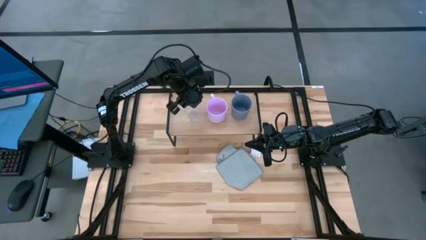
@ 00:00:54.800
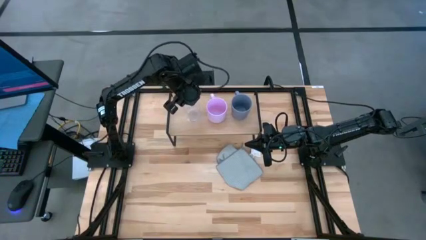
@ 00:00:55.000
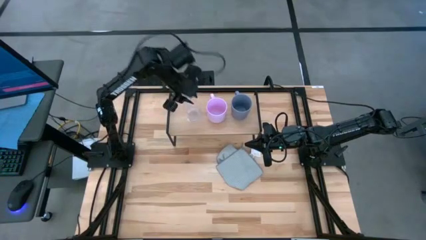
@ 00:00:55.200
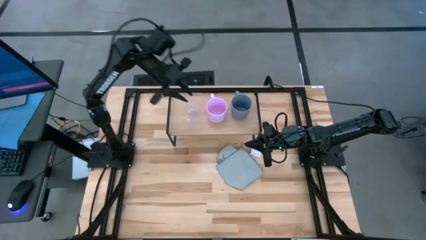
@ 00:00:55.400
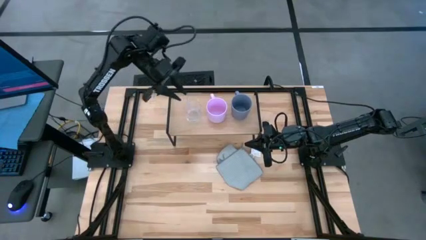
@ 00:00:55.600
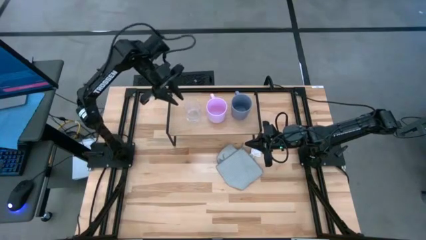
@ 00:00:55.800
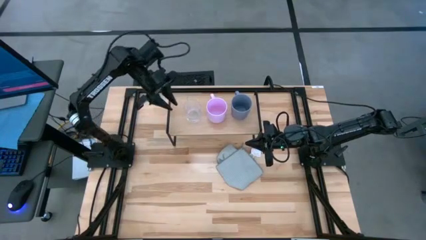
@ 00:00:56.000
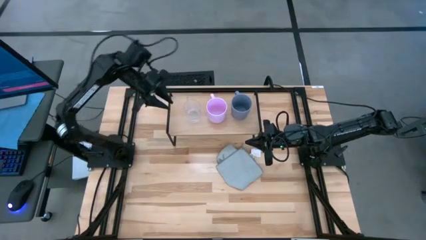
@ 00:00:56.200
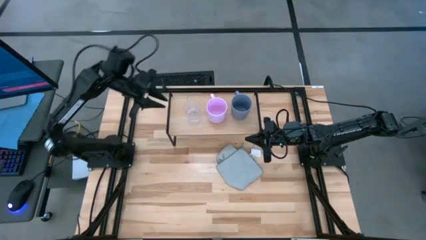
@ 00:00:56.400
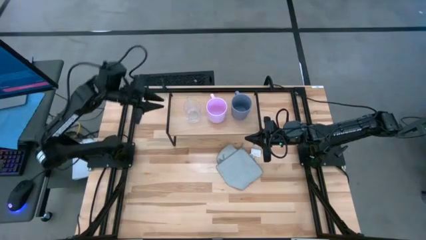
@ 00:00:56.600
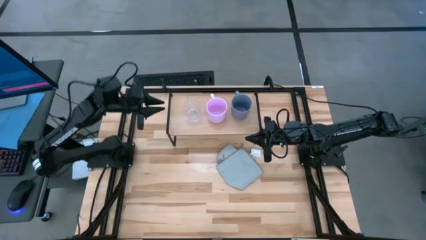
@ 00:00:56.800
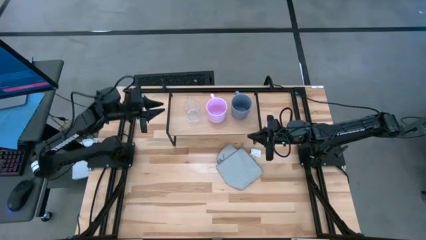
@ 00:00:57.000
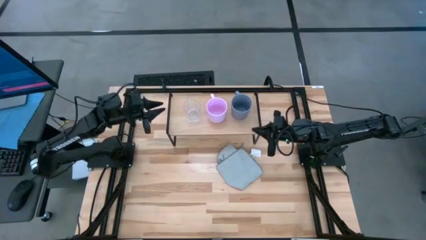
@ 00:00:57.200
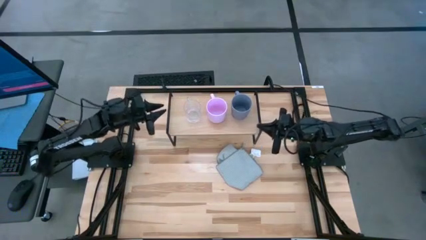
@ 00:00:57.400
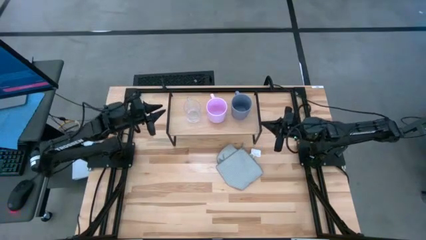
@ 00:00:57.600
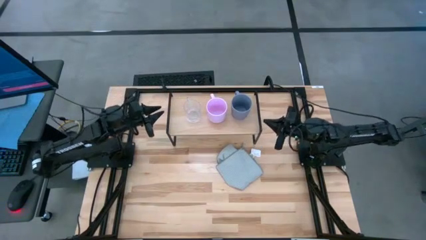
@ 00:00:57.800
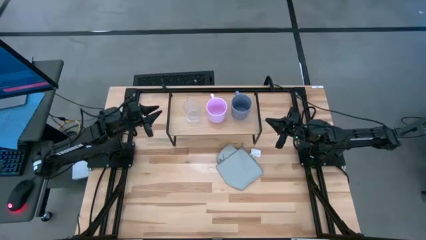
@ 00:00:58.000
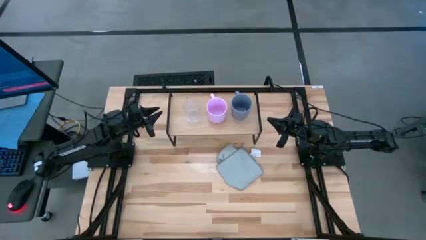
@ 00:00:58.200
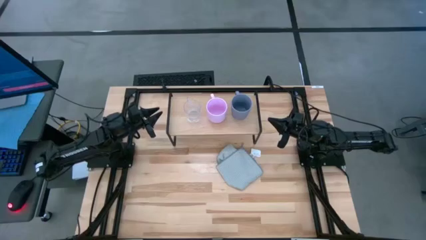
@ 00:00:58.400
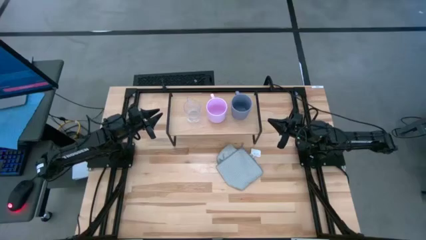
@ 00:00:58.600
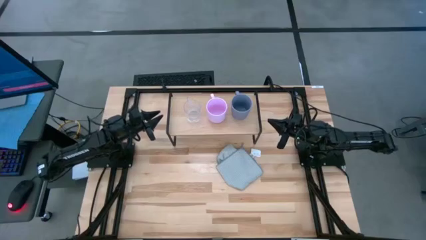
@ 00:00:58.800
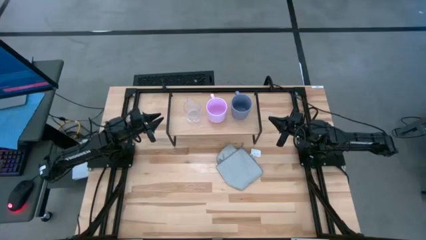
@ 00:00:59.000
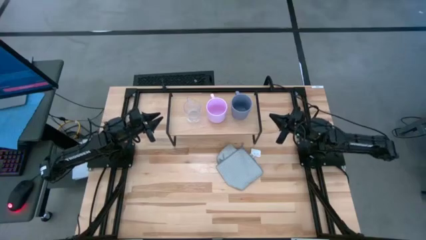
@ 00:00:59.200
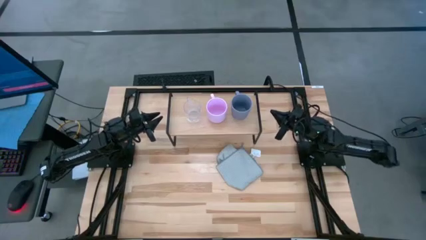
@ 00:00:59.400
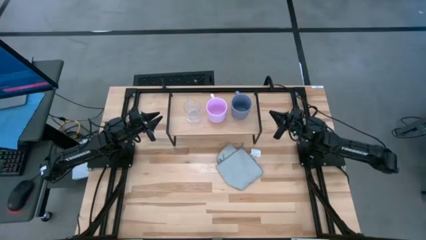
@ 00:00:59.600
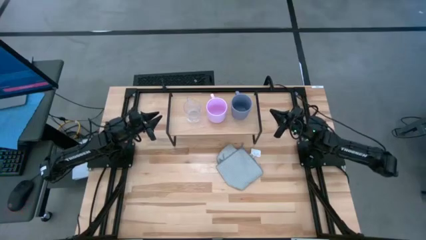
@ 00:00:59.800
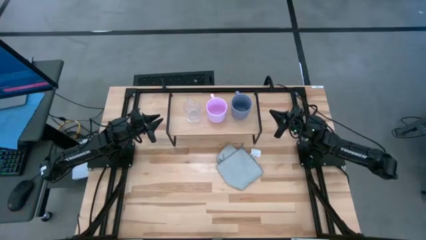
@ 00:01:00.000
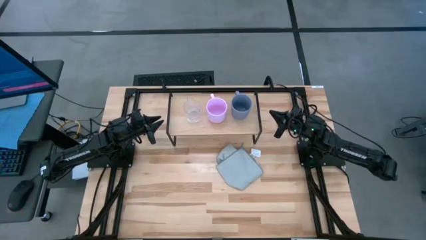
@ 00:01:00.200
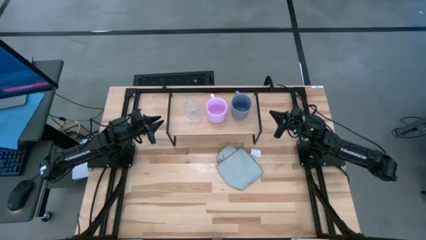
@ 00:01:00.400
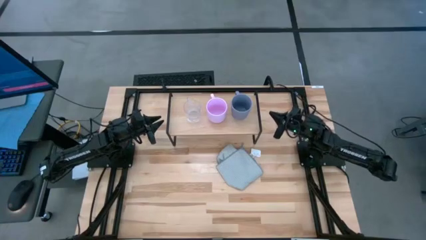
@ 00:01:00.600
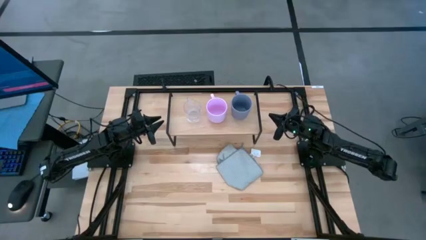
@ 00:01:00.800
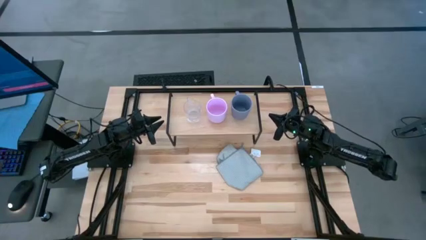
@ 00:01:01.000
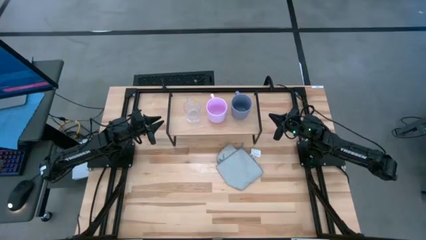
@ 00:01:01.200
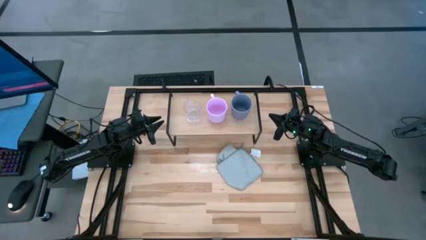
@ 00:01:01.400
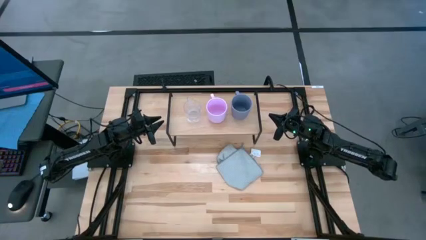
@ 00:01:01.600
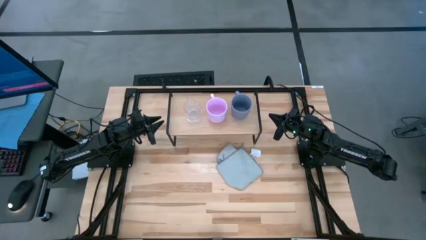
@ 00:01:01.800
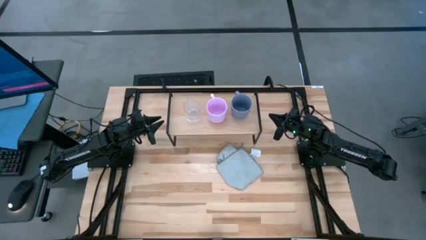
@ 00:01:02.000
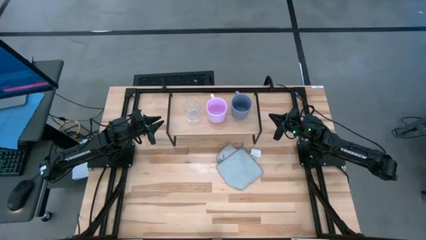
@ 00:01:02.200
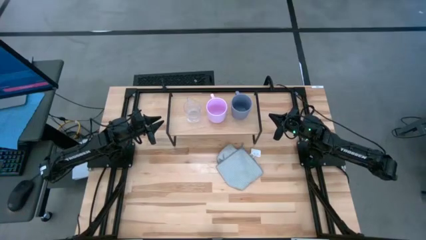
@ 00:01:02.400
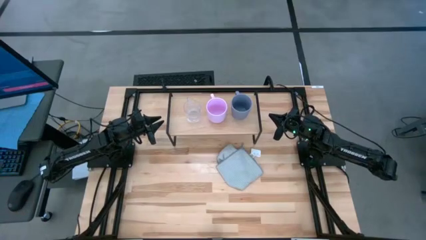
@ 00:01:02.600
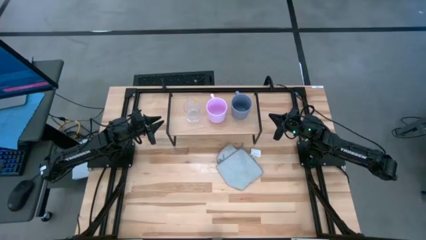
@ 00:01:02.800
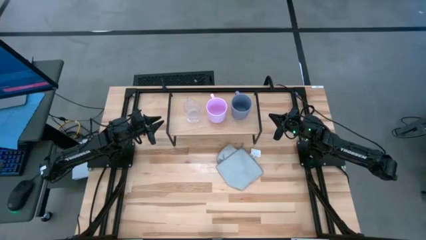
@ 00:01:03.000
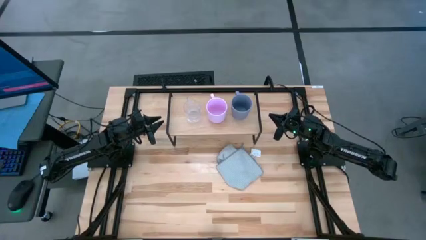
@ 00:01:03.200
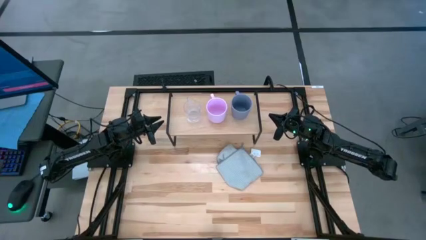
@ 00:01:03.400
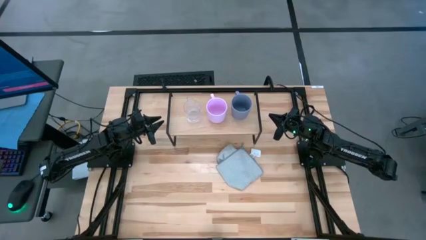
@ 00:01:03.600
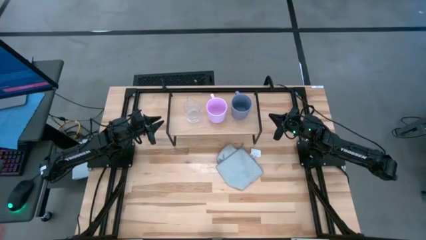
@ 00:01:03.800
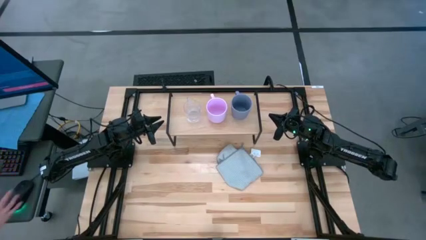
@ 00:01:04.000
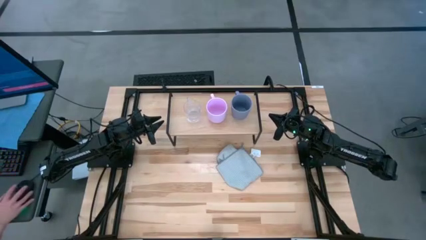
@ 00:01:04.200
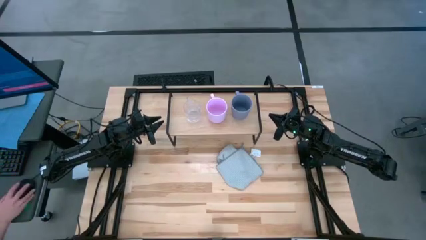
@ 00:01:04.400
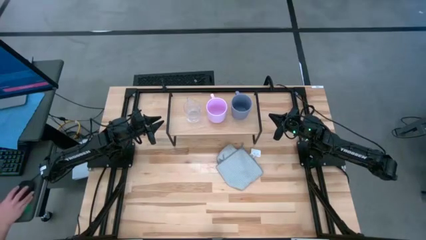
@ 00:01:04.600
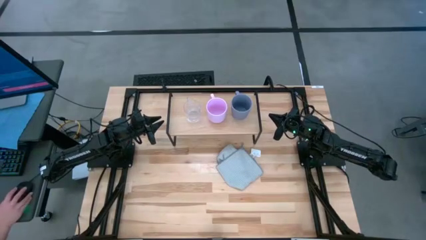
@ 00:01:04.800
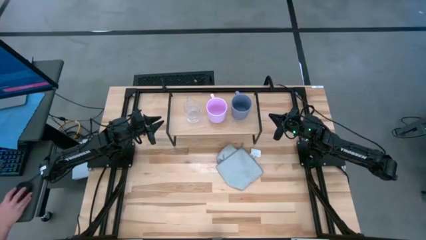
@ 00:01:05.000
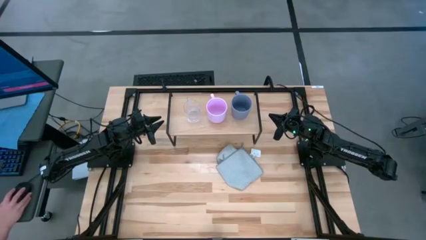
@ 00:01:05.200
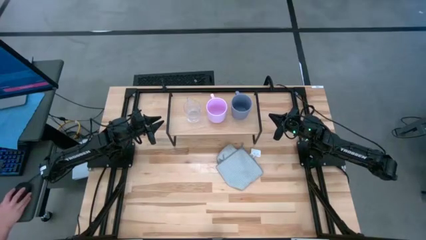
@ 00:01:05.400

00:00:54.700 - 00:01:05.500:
Task: Stack small to large cups/mugs on shelf
Return to Home Position
